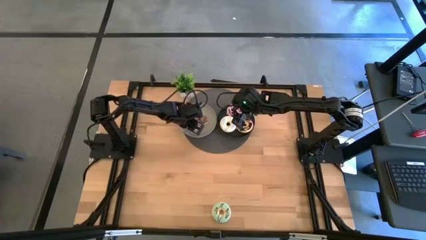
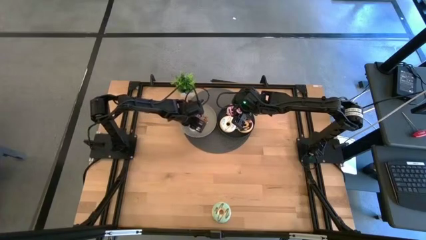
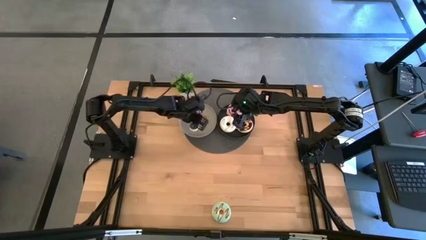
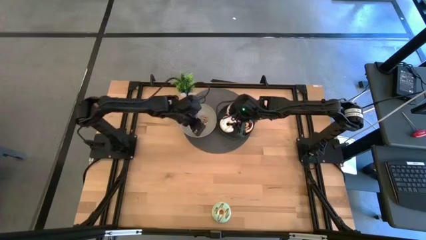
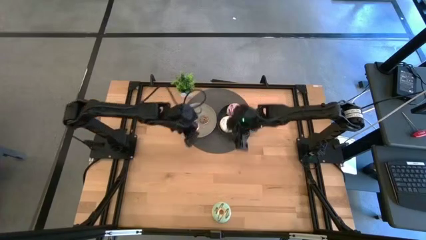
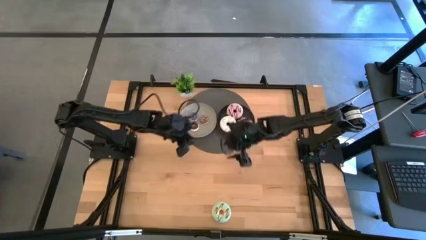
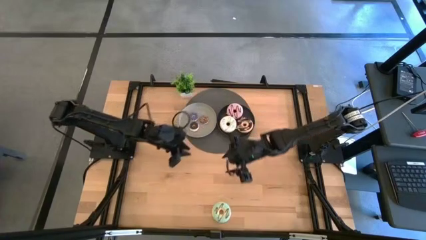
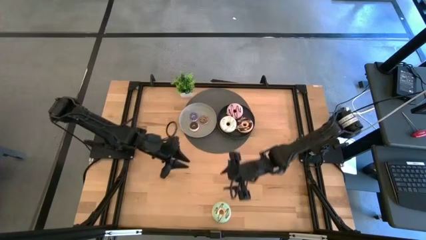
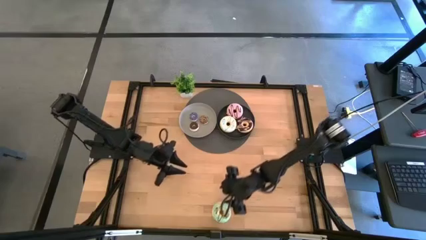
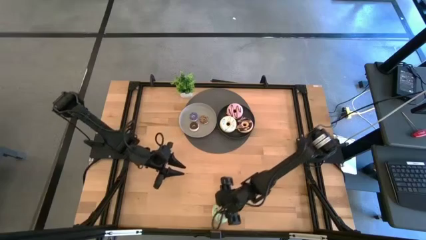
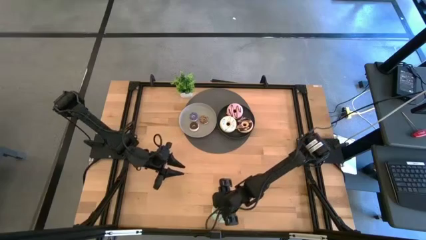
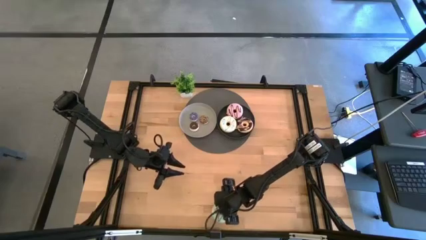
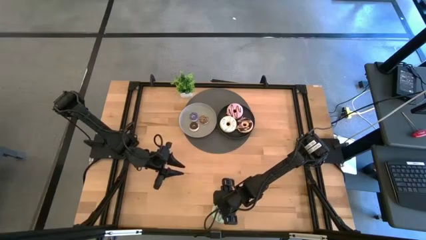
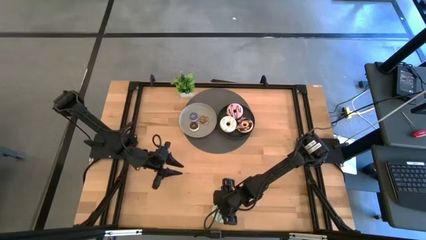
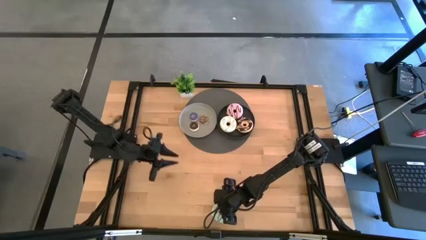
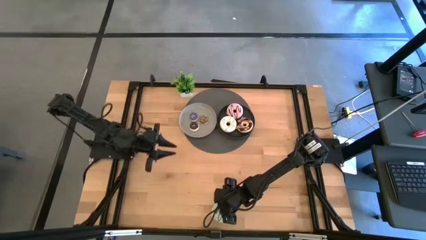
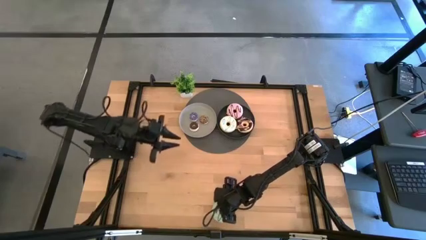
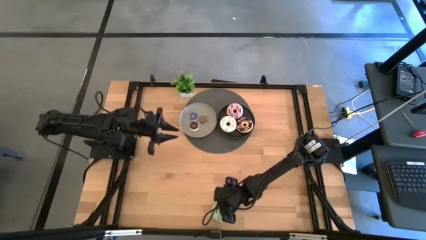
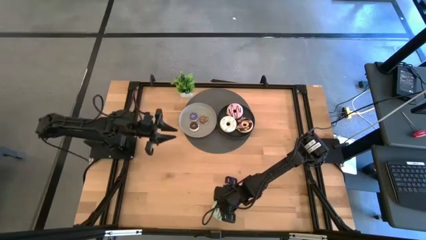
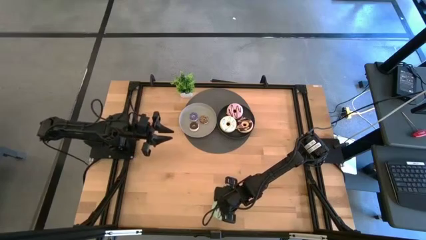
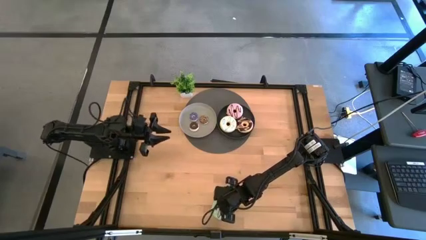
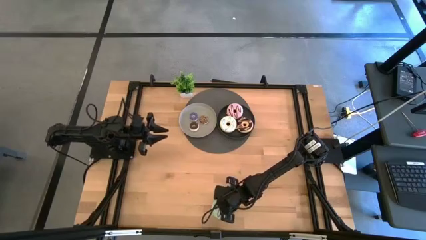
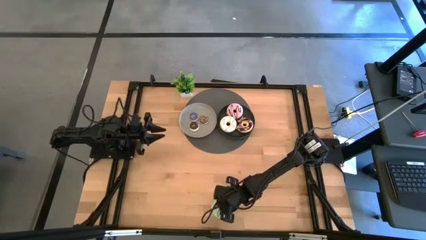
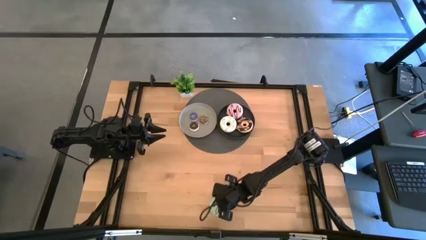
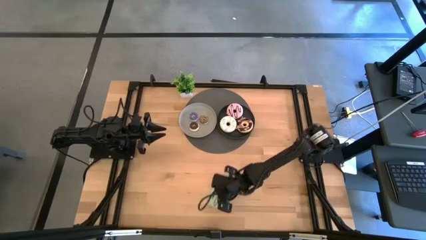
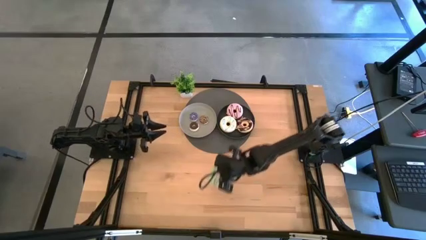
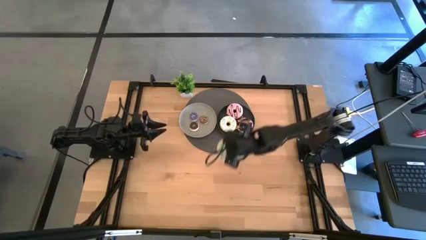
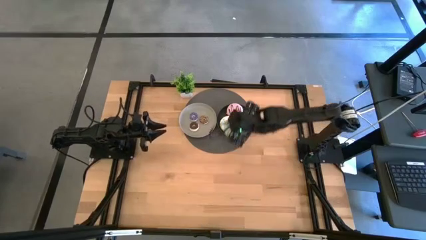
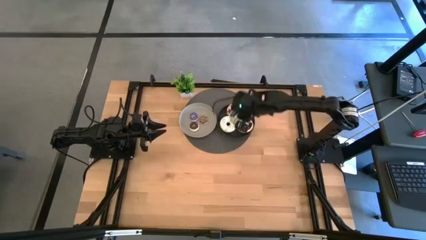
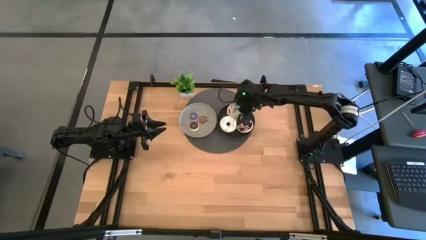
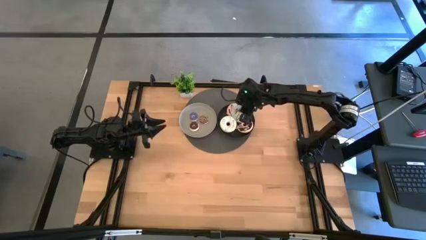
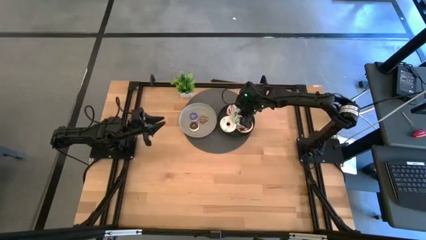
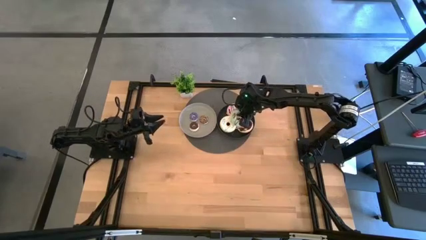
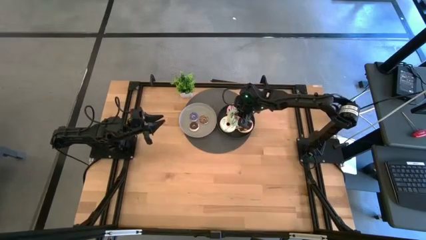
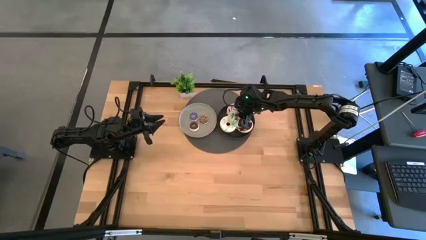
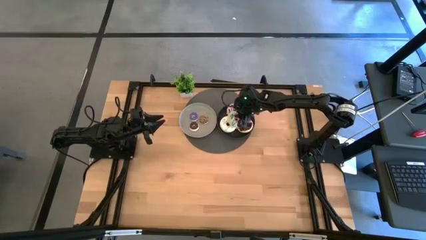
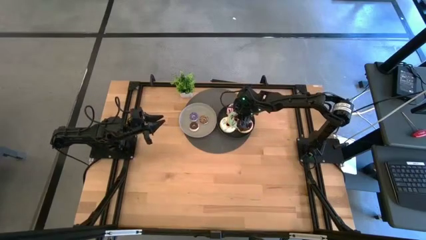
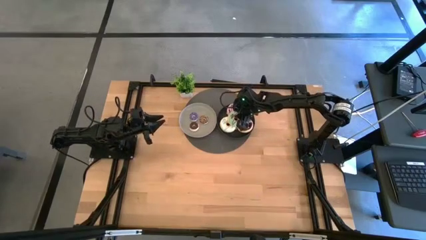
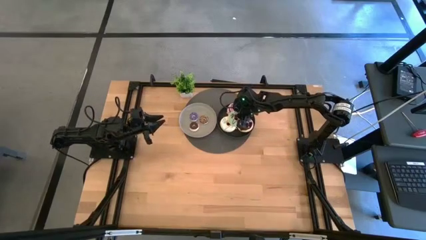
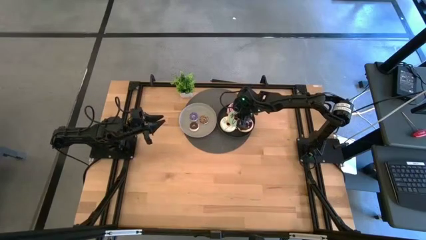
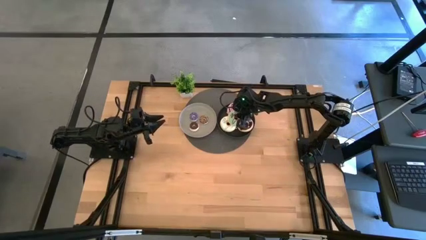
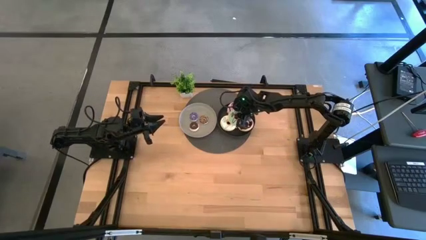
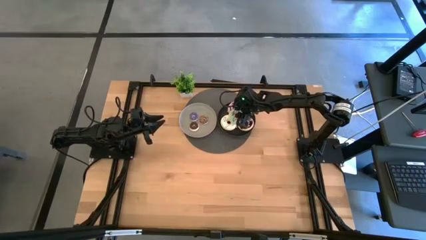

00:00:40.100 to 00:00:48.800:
Task: Pick & Place donuts
Put the big green donut on the black plate

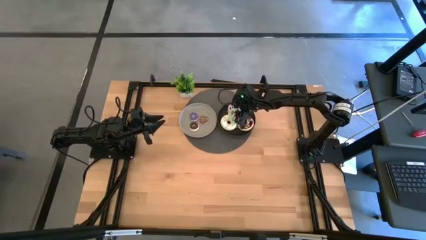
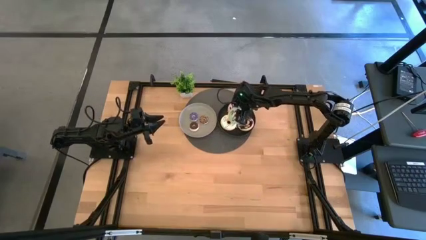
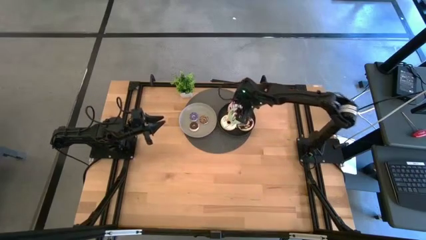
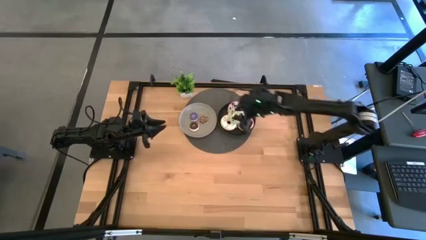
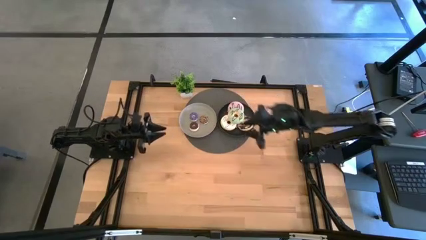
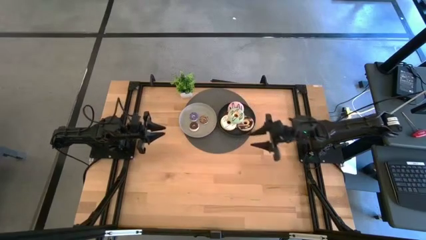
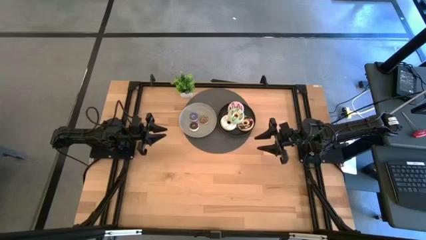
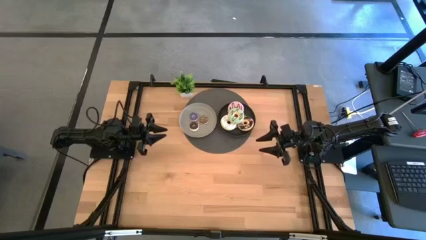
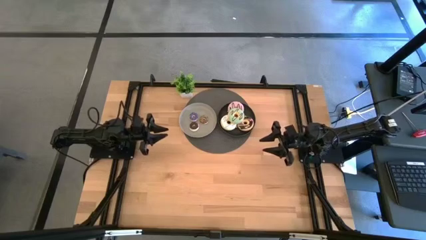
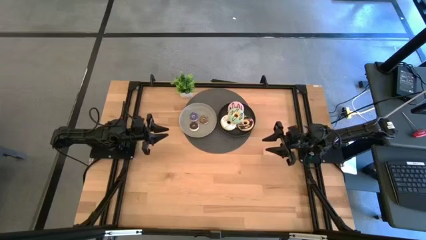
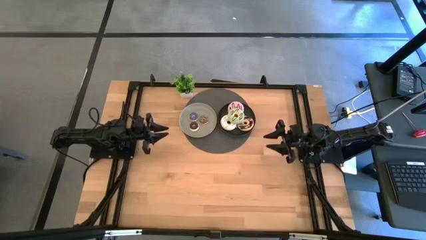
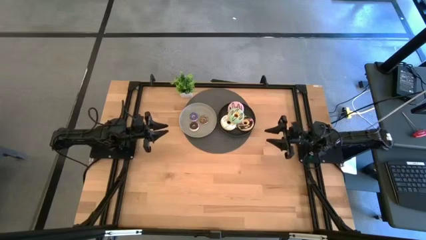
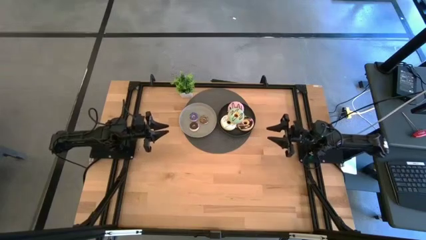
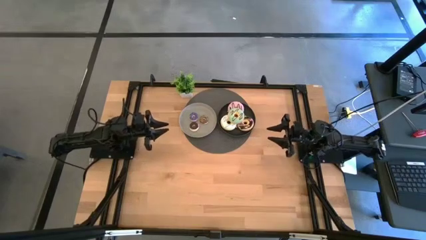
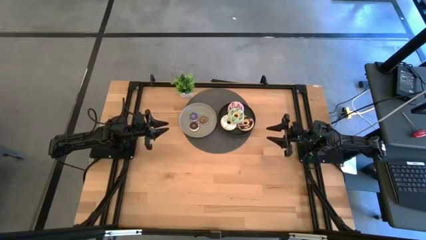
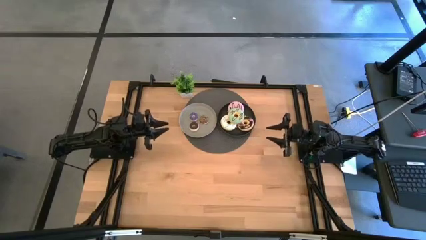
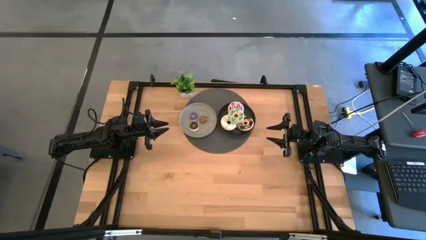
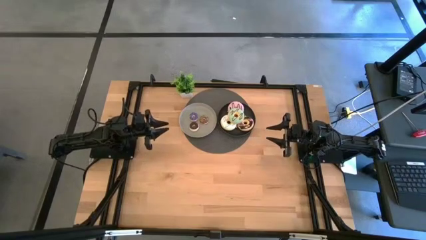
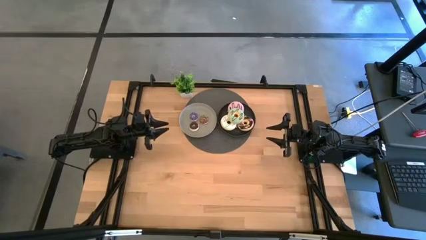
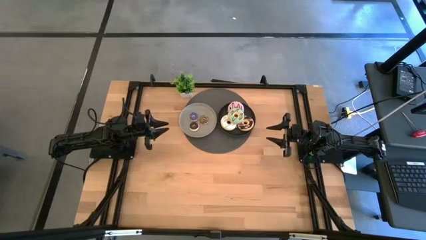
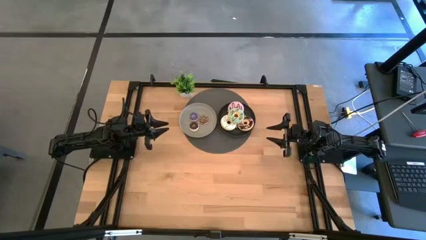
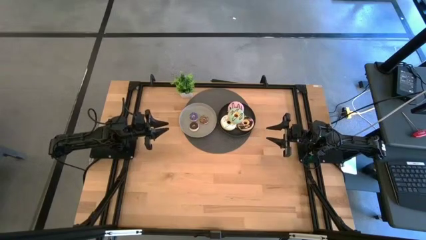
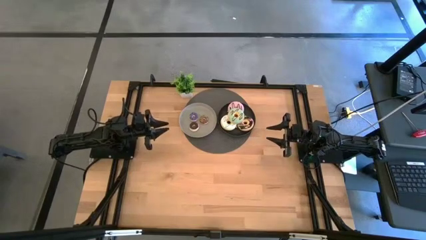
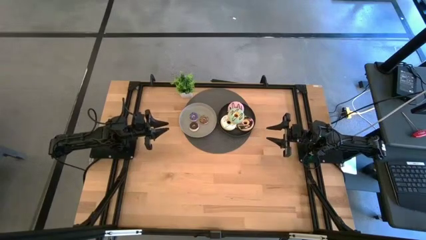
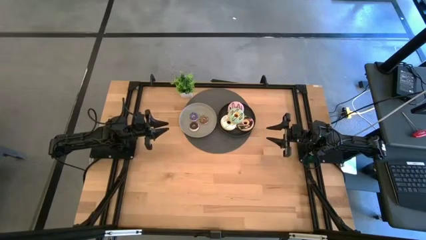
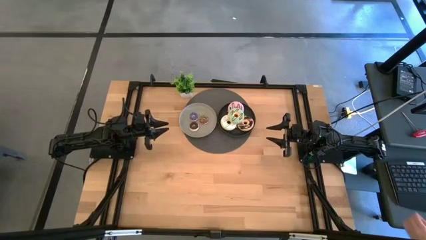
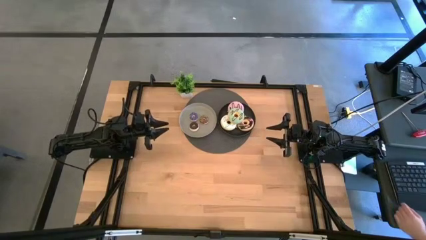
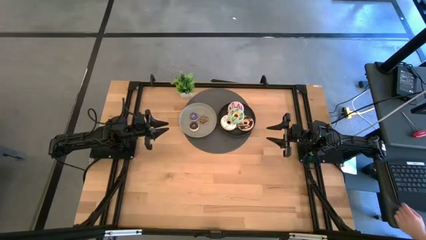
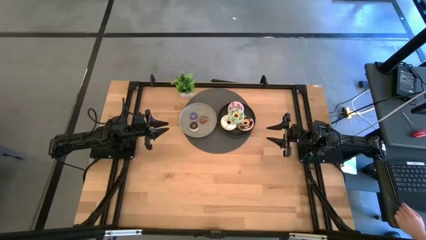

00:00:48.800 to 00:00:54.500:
Return to Home Position
